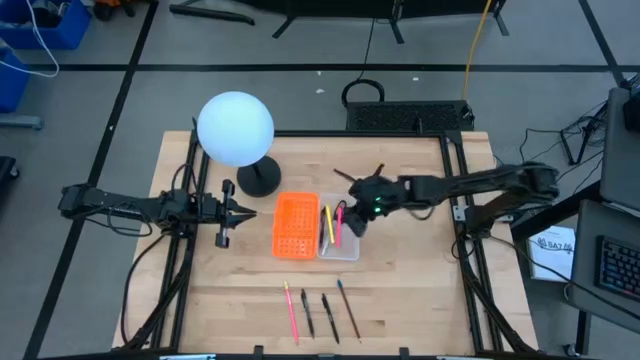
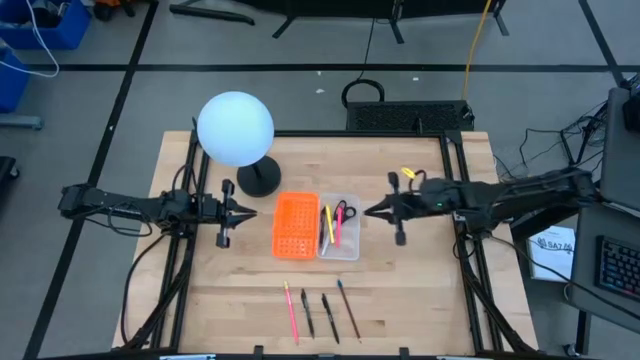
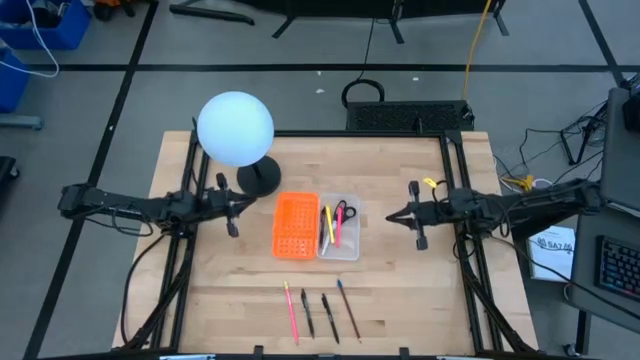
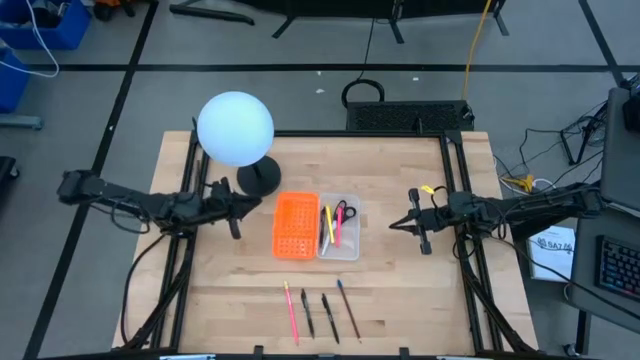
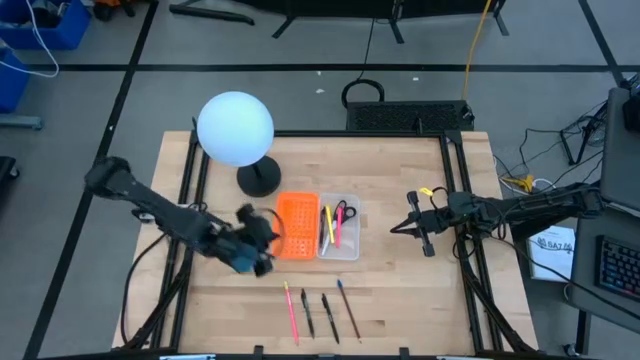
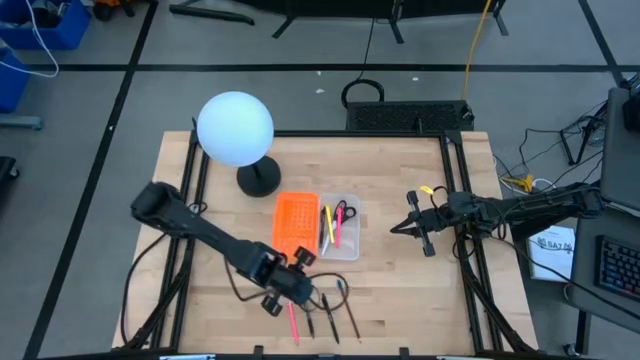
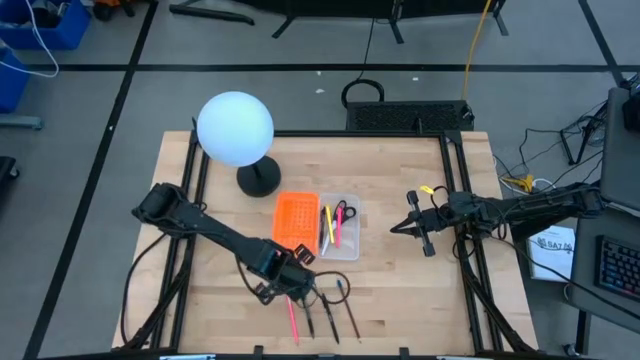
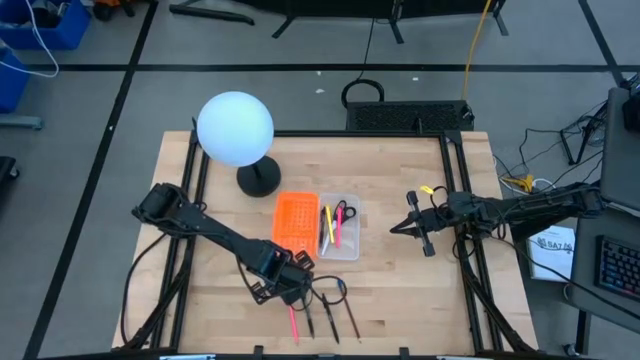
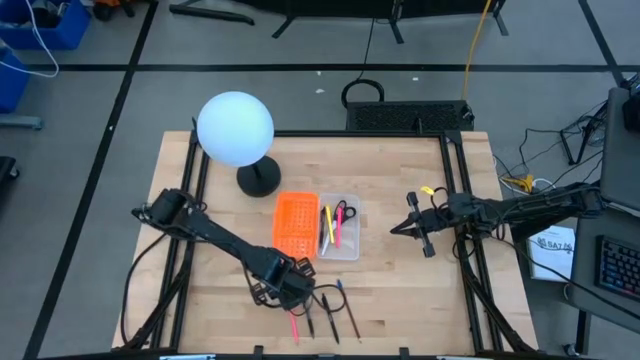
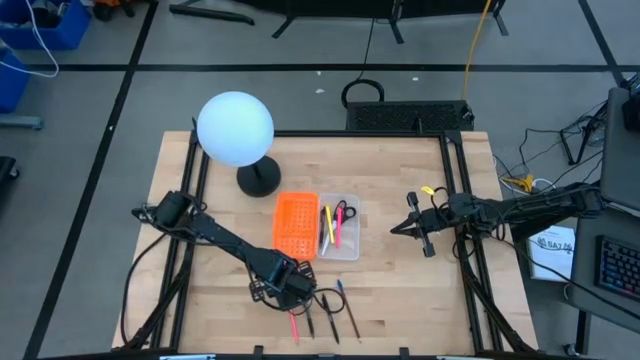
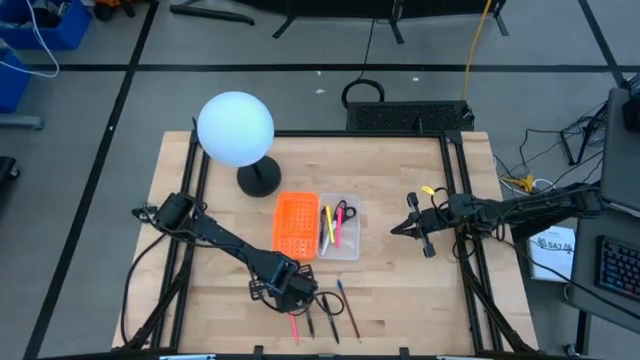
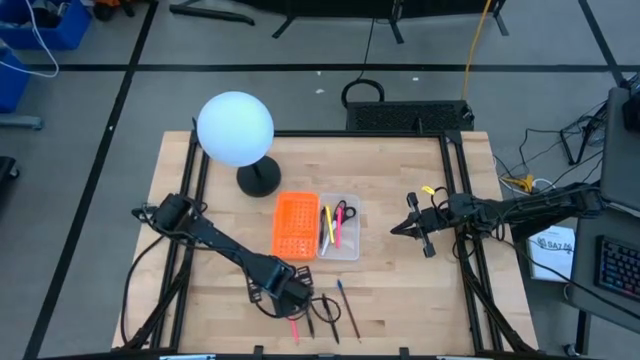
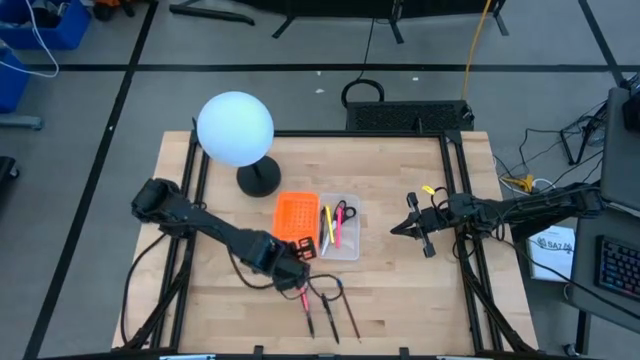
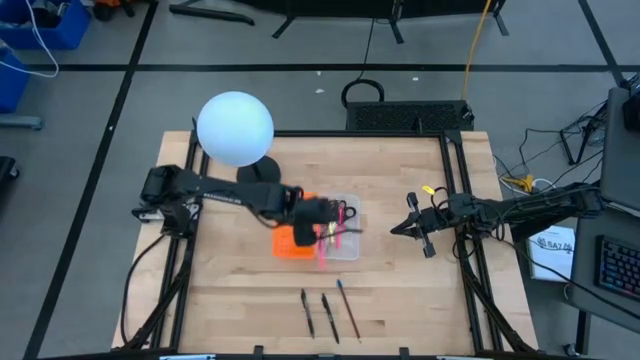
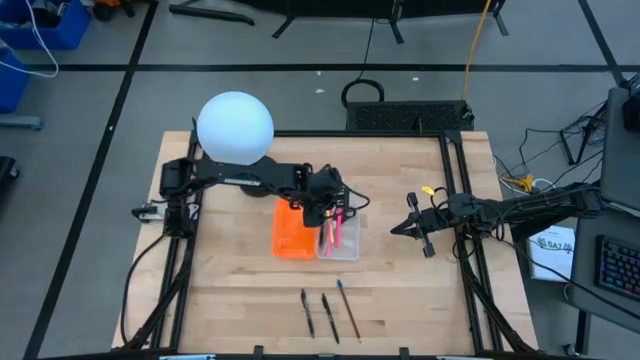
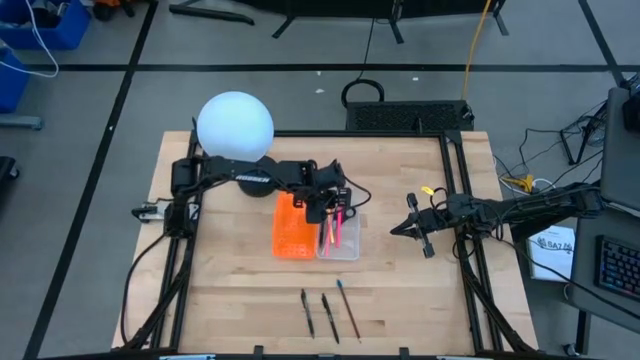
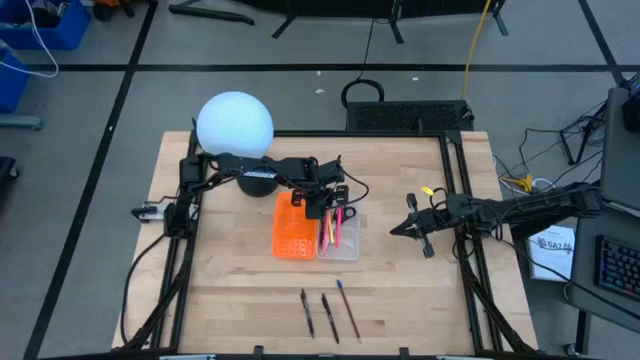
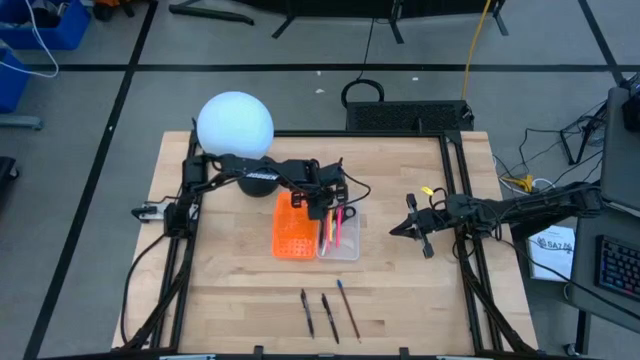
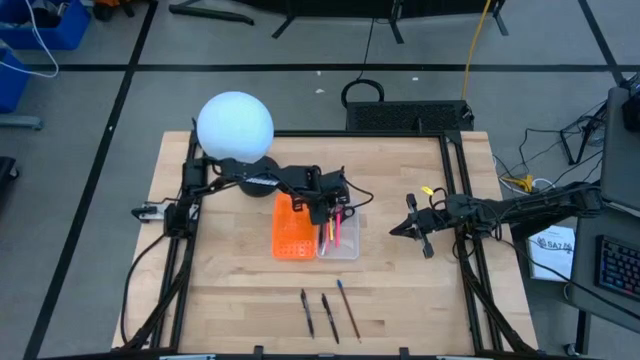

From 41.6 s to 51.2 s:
Task: Pick & place school supplies into a supply box
Put the pink pencil into the orange supply box

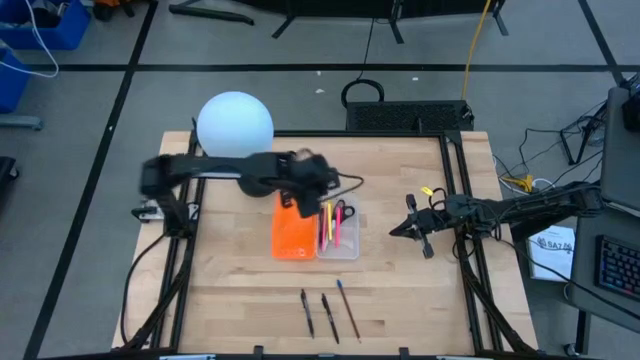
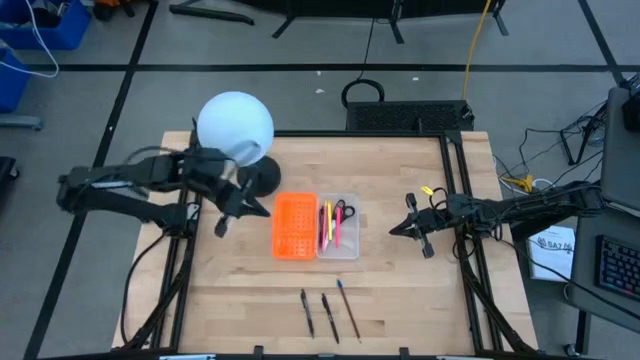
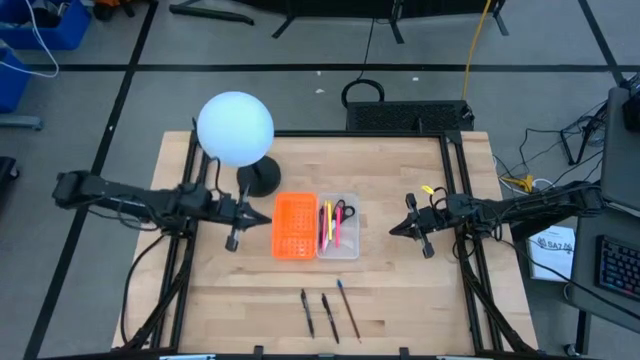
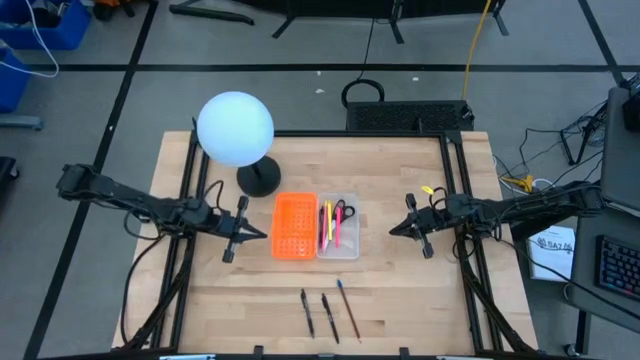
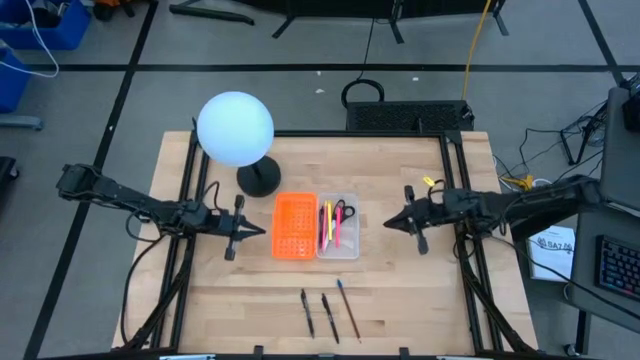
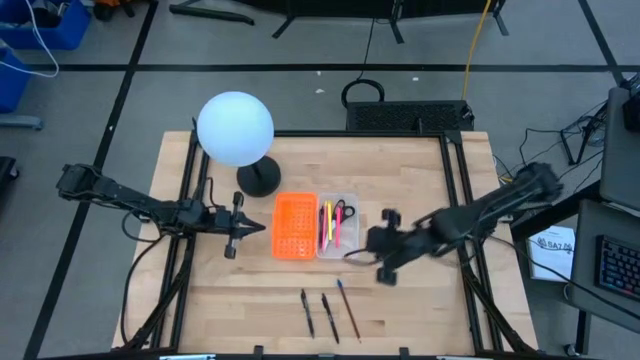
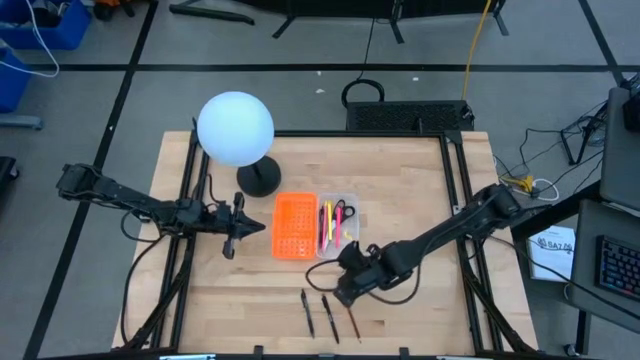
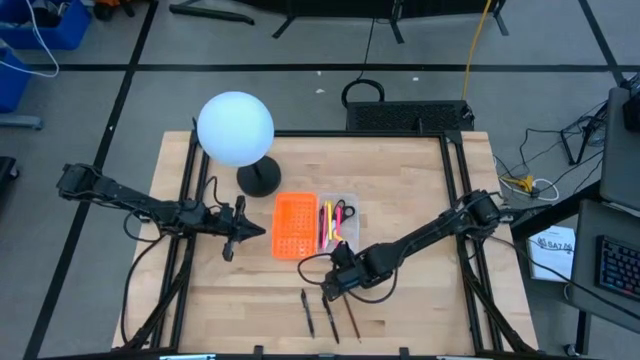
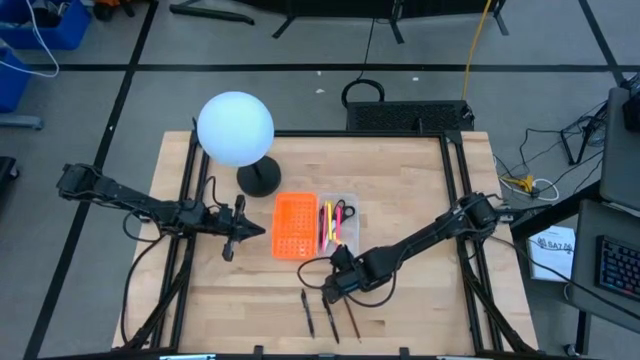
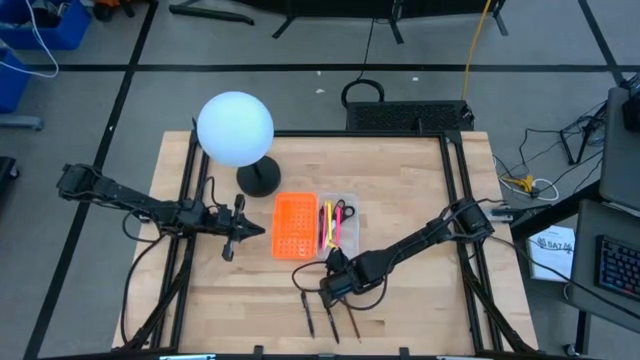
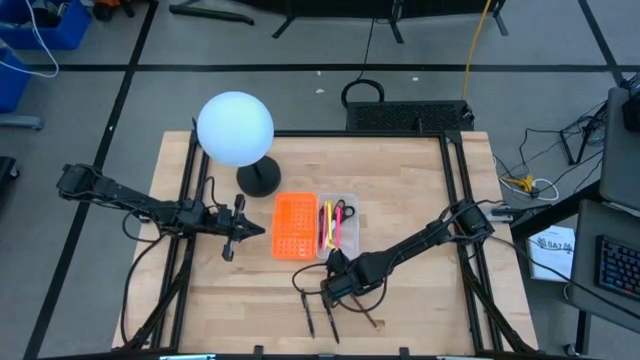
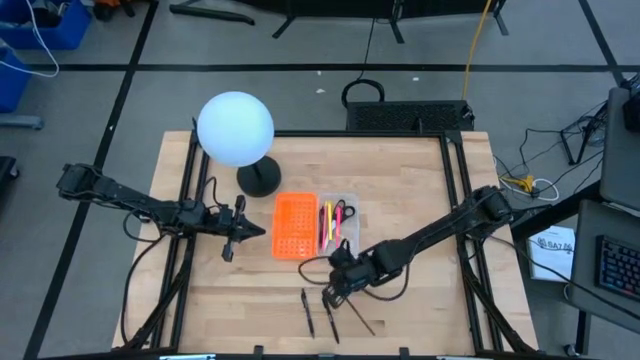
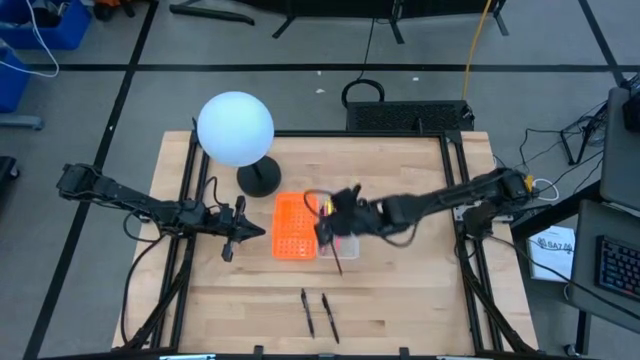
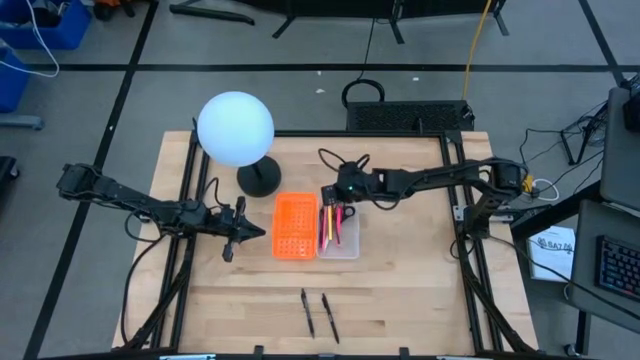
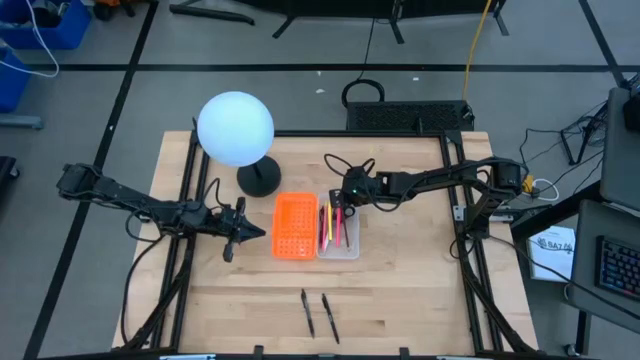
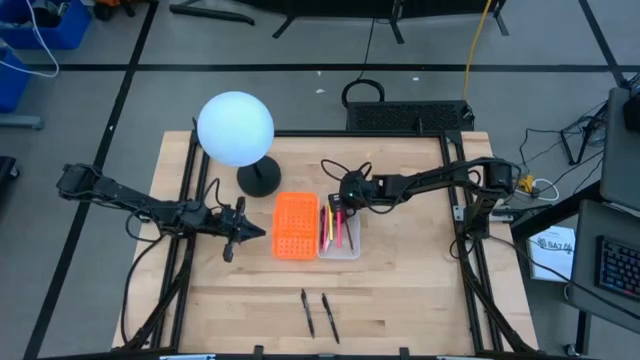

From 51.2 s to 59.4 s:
Put the brown pencil into the orange supply box

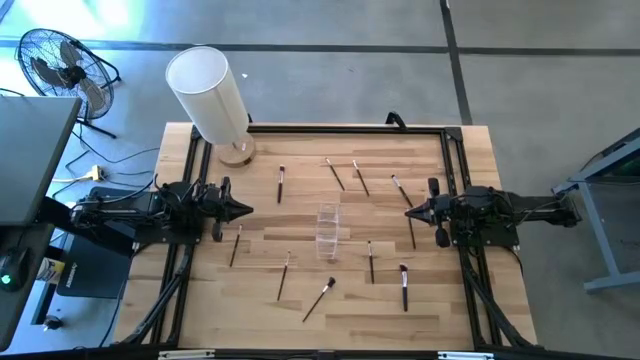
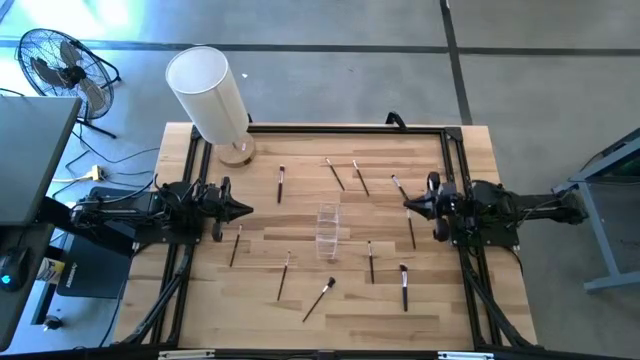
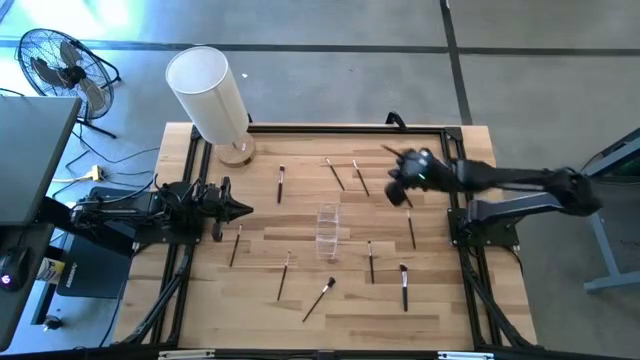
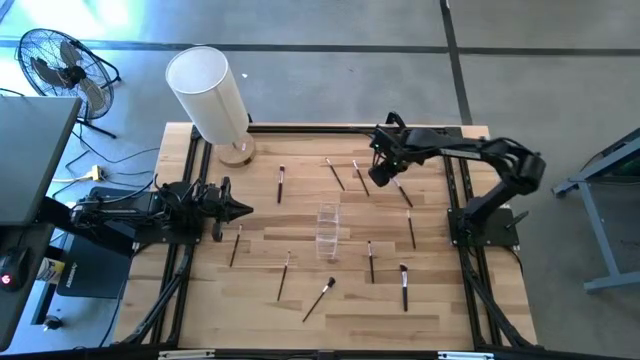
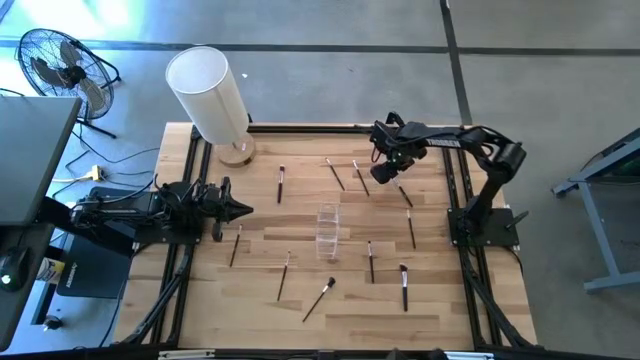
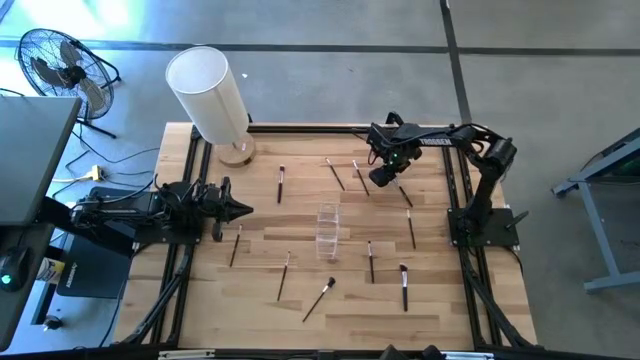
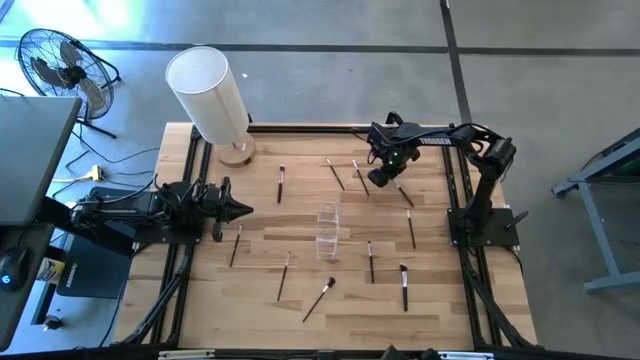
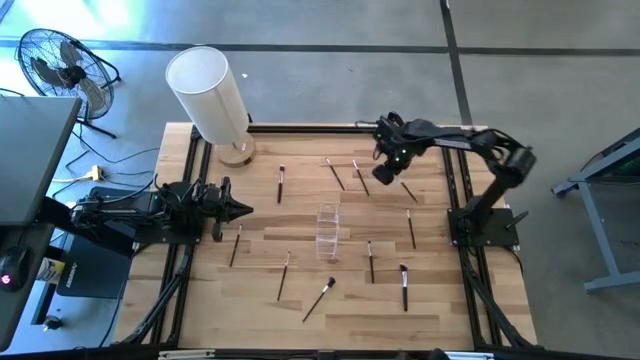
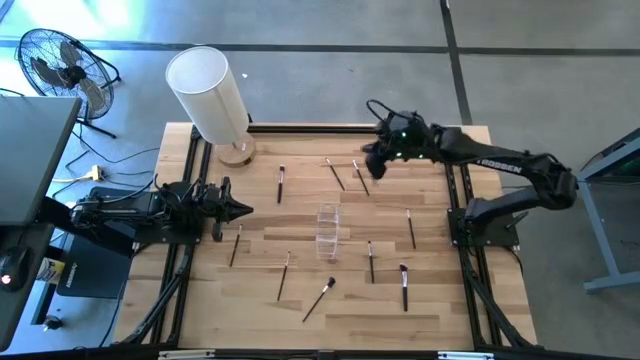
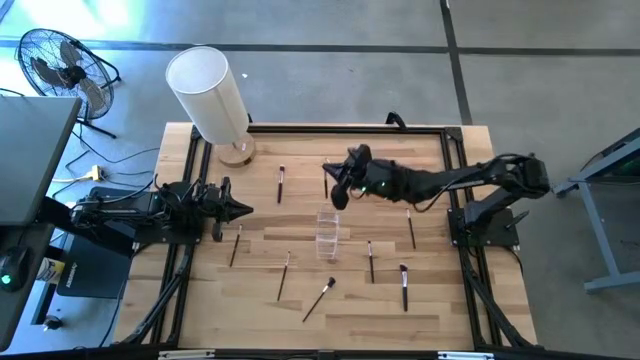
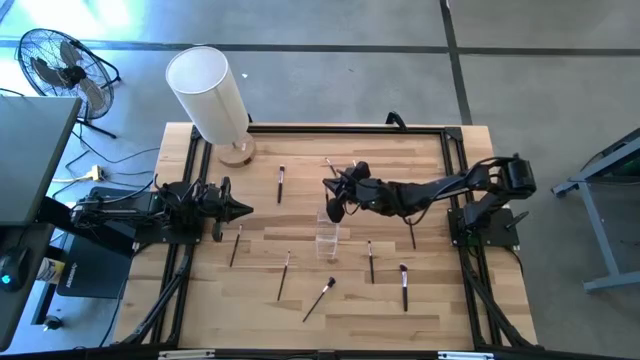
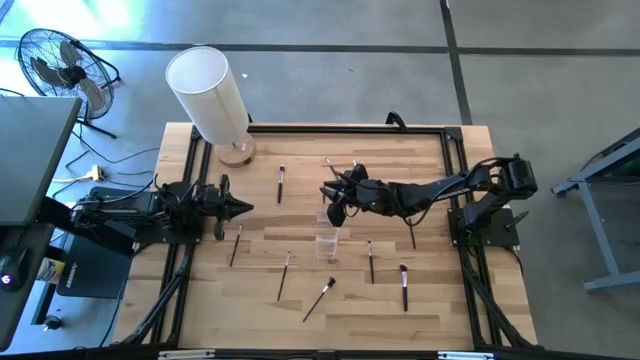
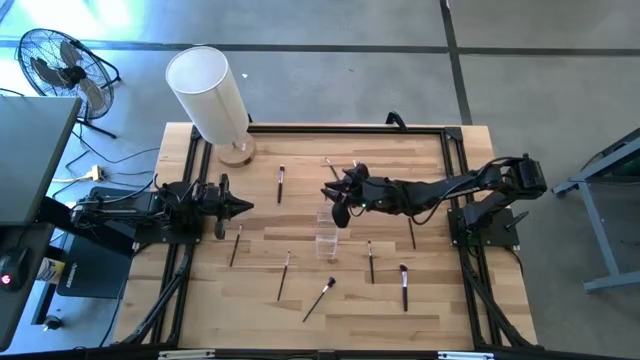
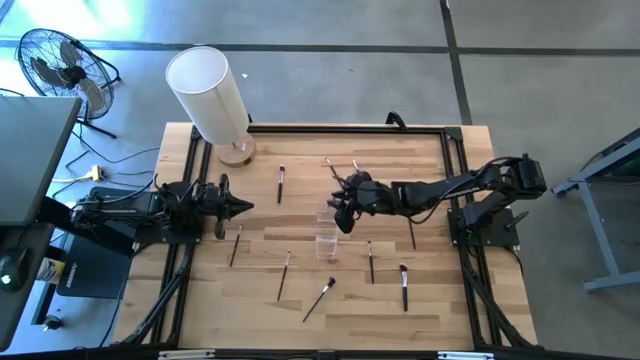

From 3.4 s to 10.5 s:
Task: Pick & Place Makeup Brushes
Put the eyeshadow brush into the transparent organizer
